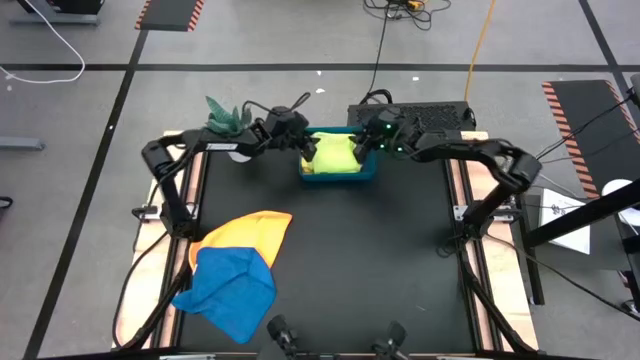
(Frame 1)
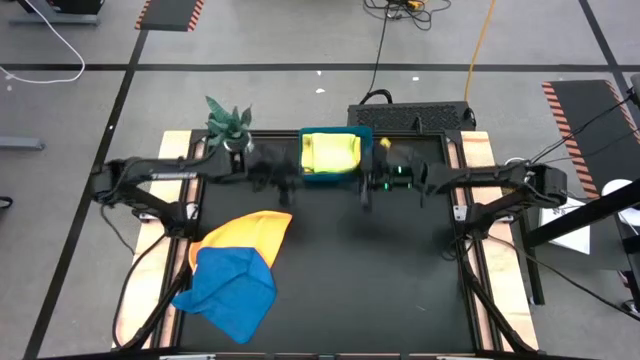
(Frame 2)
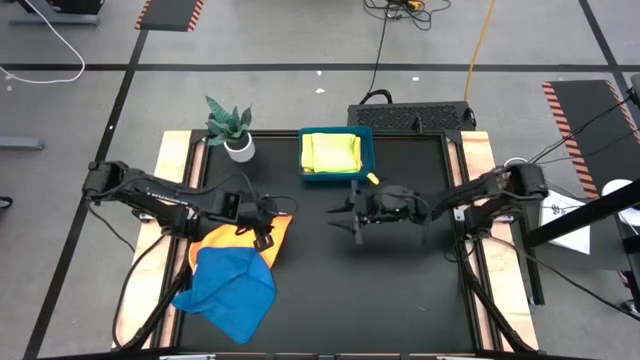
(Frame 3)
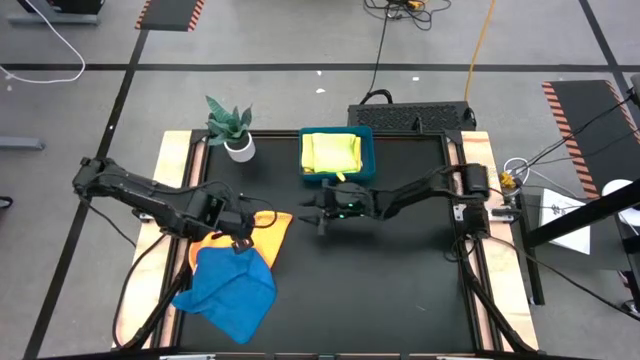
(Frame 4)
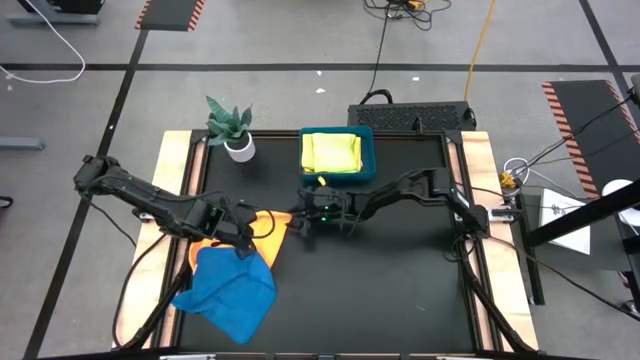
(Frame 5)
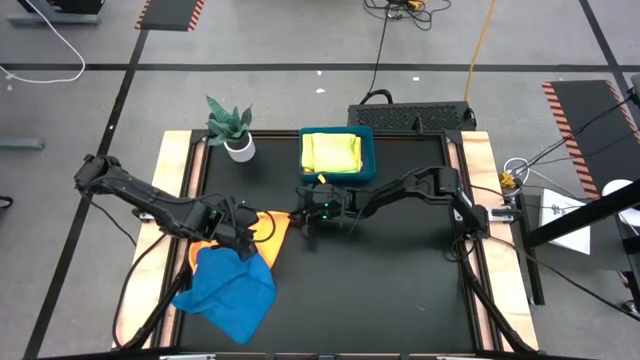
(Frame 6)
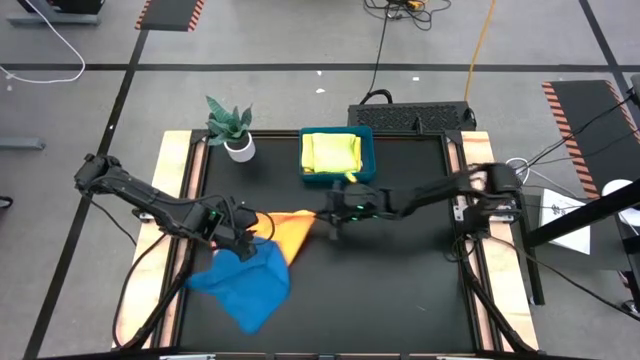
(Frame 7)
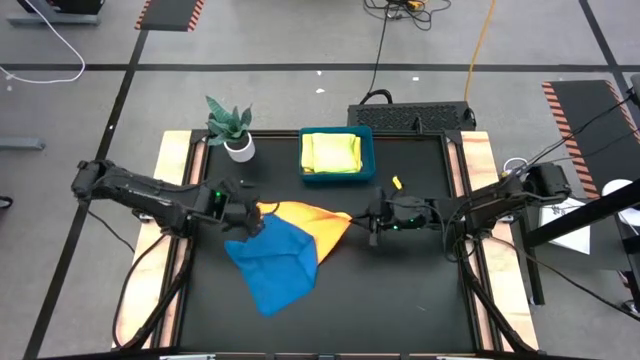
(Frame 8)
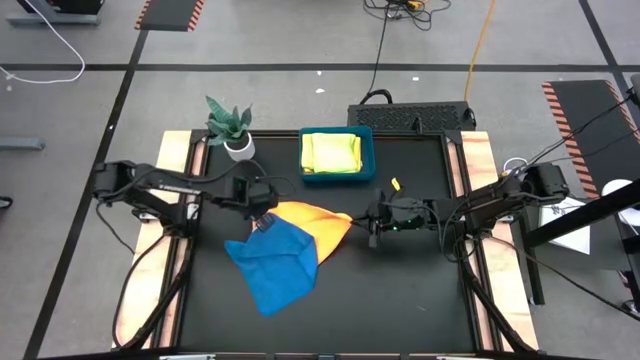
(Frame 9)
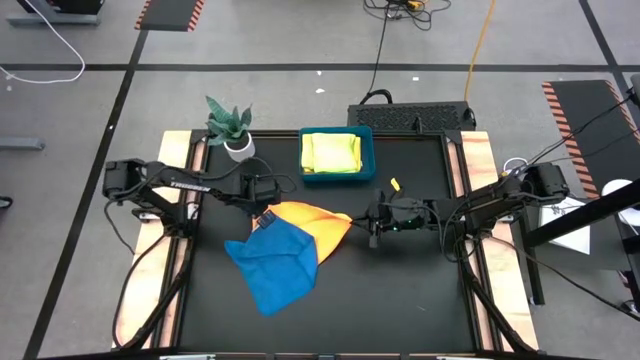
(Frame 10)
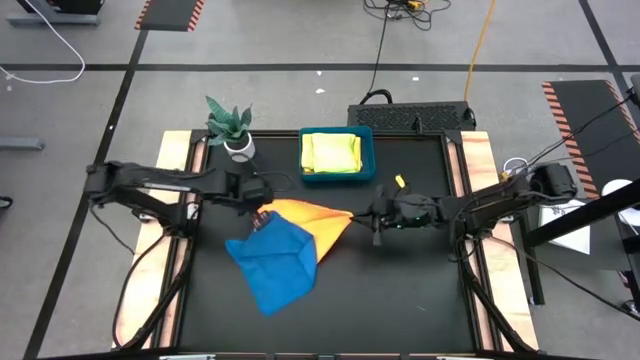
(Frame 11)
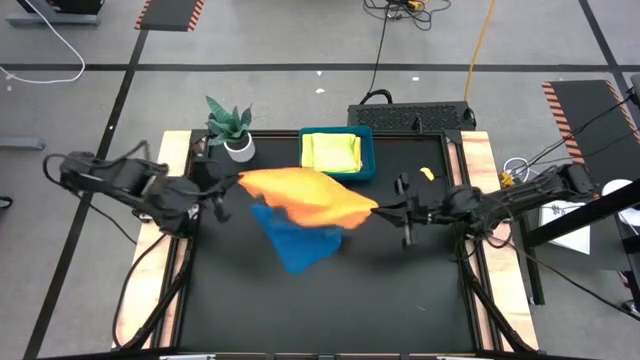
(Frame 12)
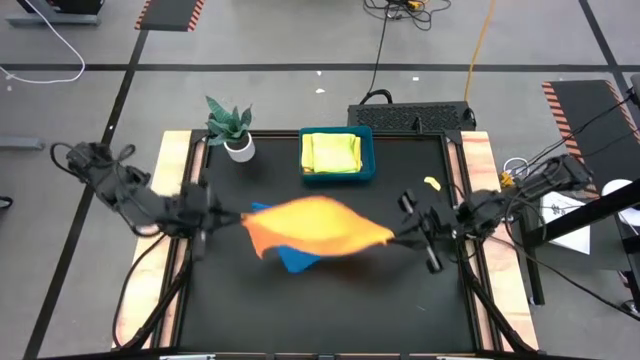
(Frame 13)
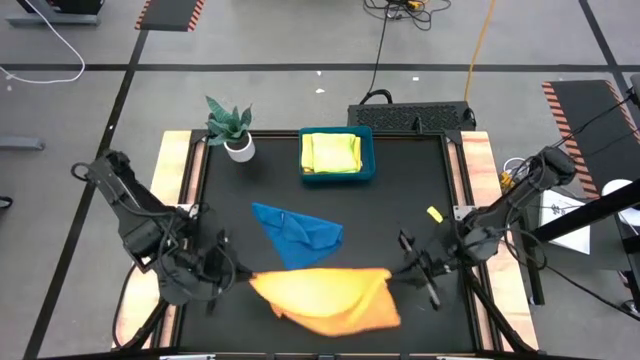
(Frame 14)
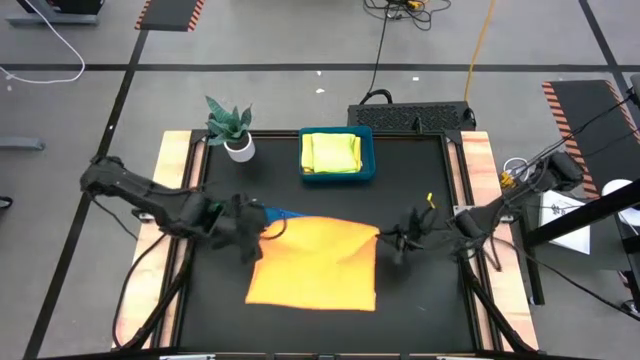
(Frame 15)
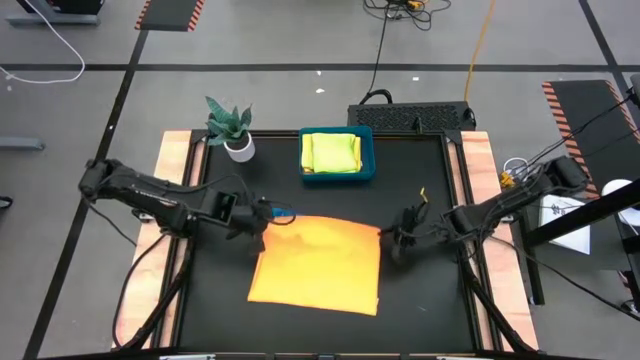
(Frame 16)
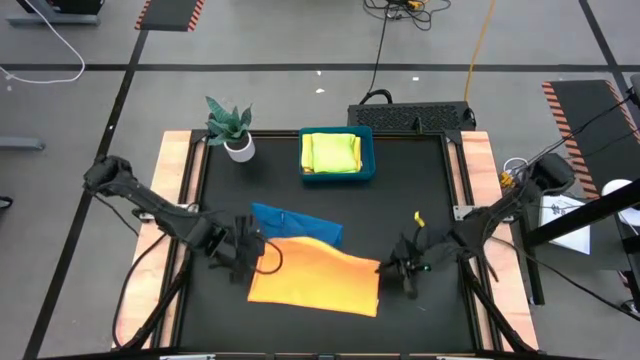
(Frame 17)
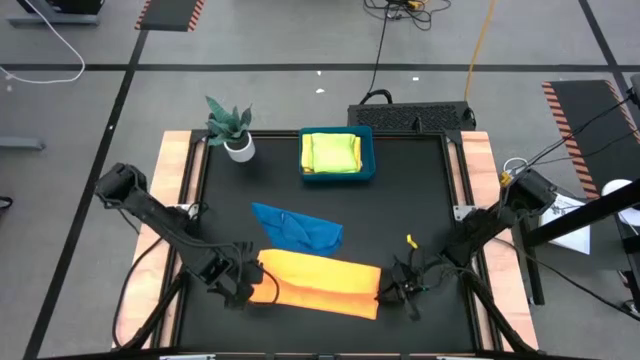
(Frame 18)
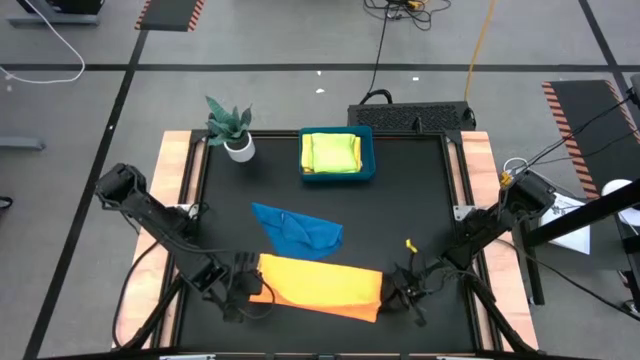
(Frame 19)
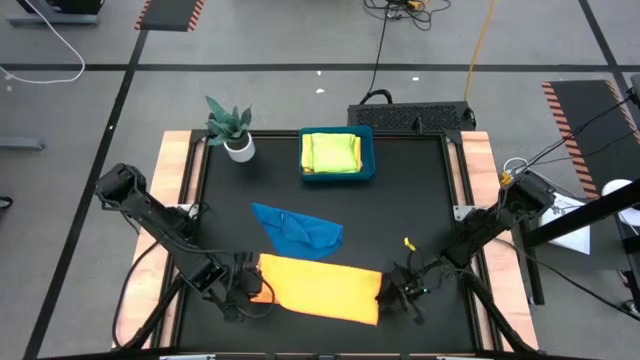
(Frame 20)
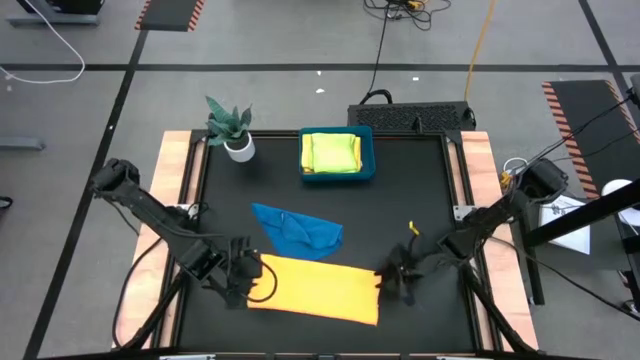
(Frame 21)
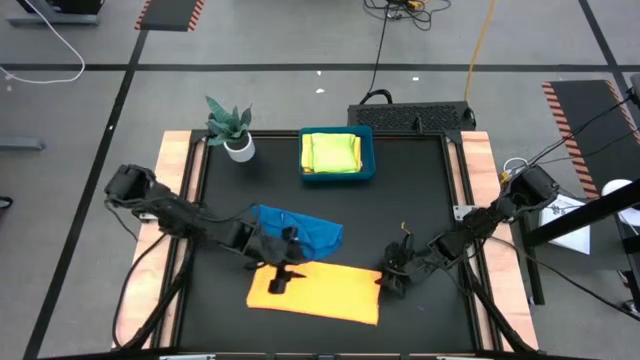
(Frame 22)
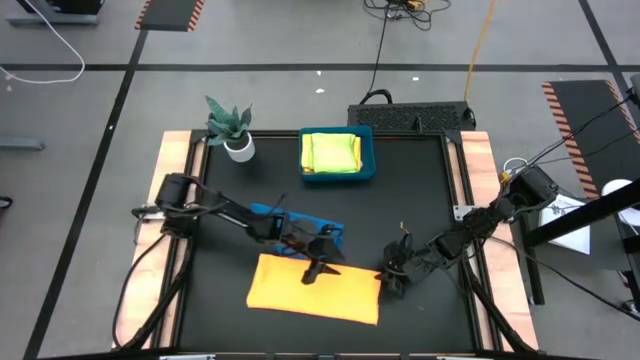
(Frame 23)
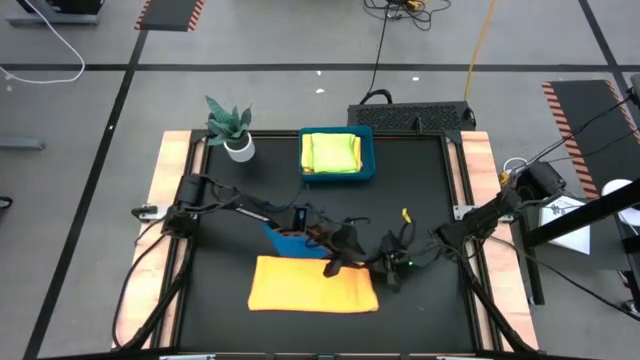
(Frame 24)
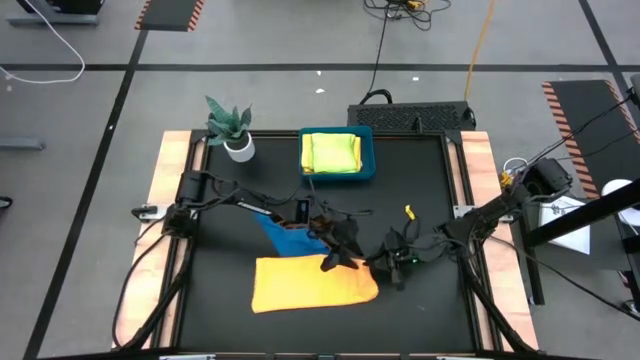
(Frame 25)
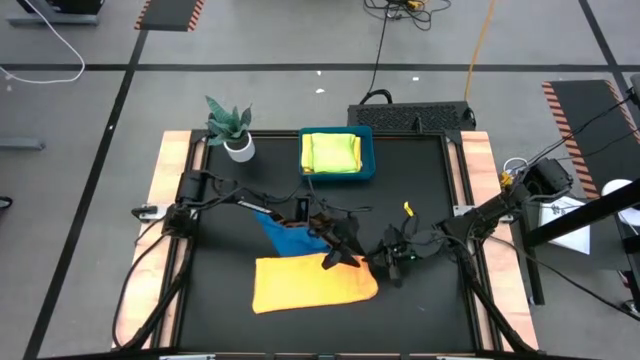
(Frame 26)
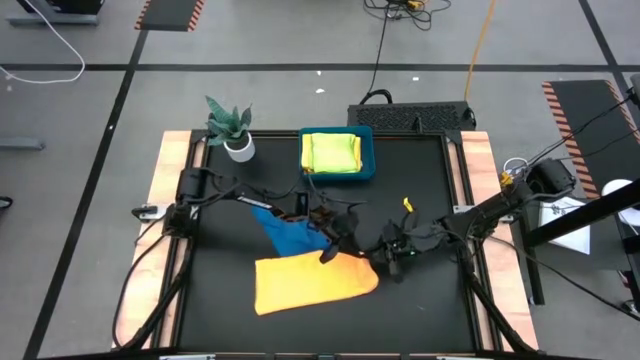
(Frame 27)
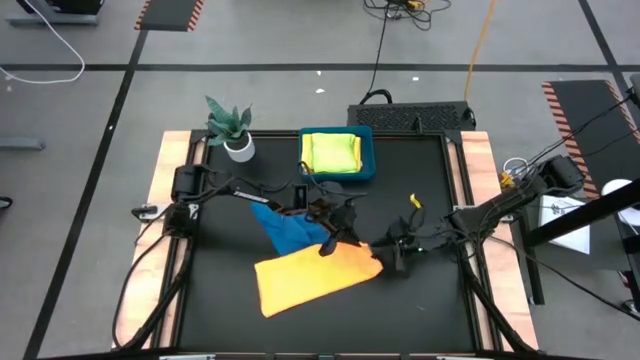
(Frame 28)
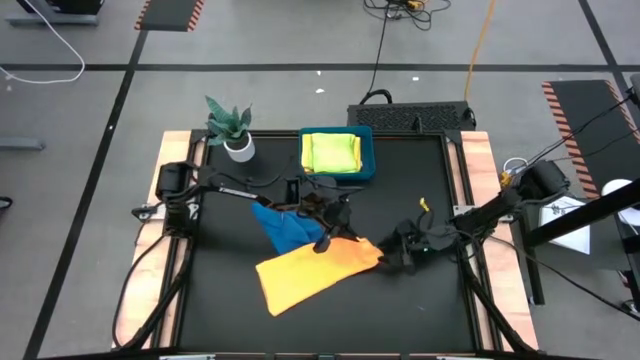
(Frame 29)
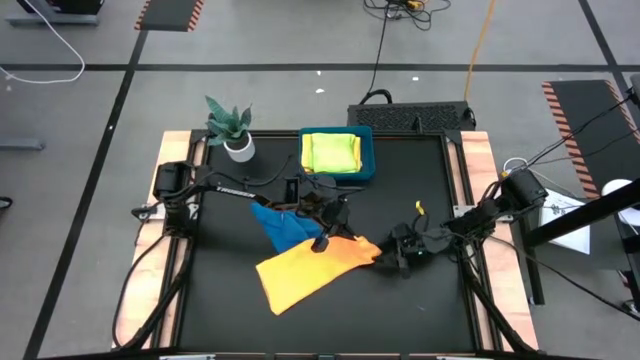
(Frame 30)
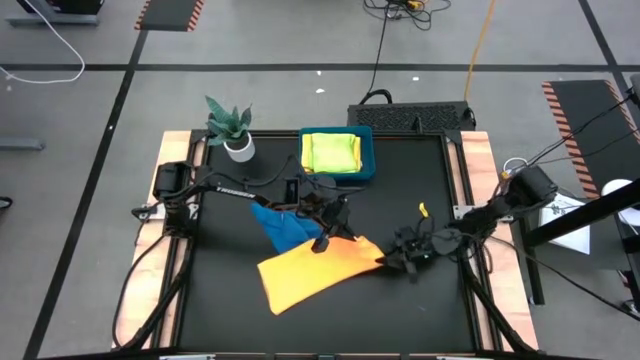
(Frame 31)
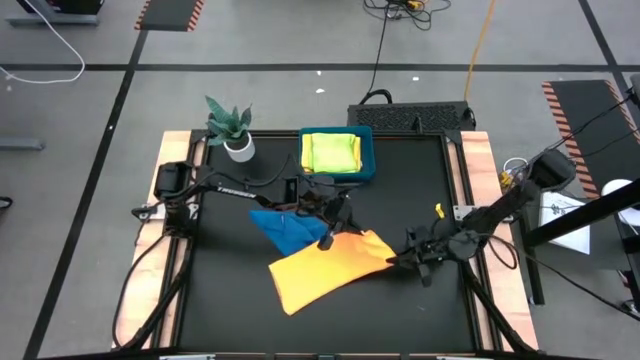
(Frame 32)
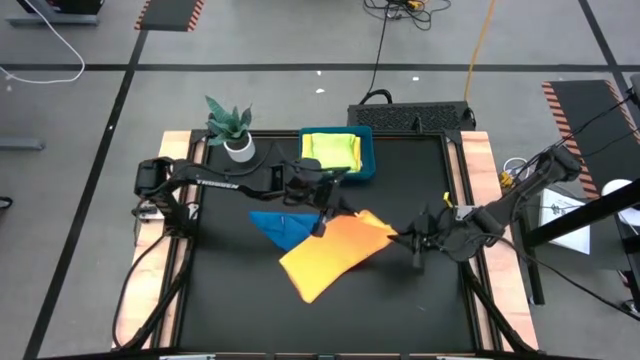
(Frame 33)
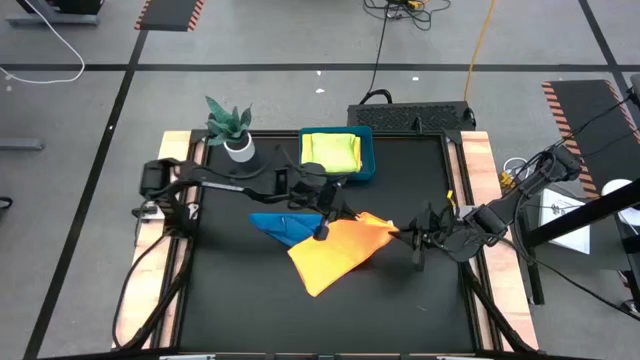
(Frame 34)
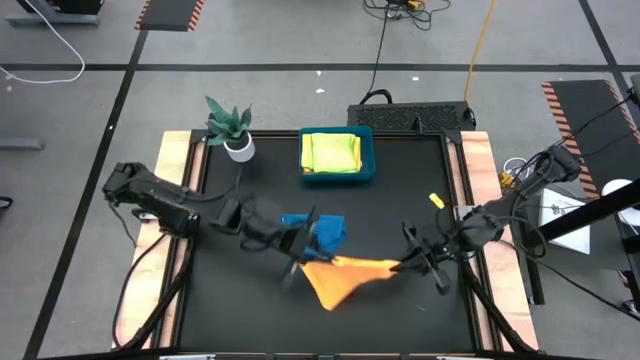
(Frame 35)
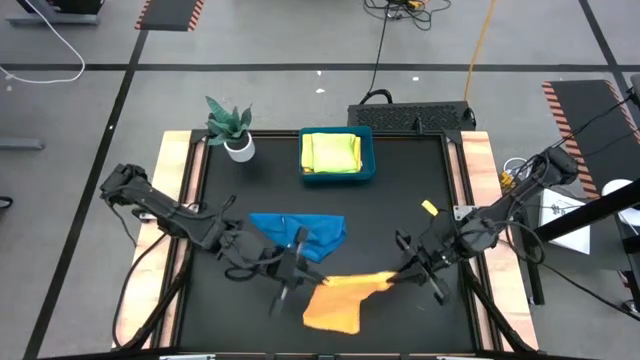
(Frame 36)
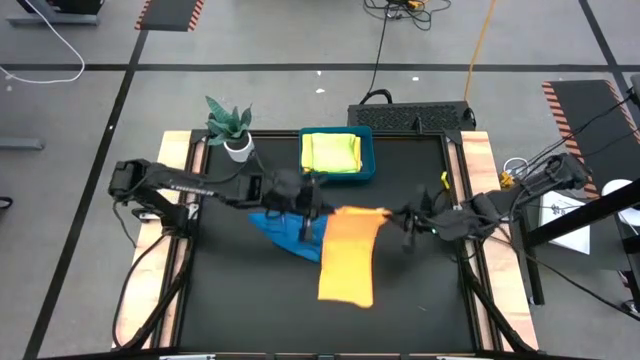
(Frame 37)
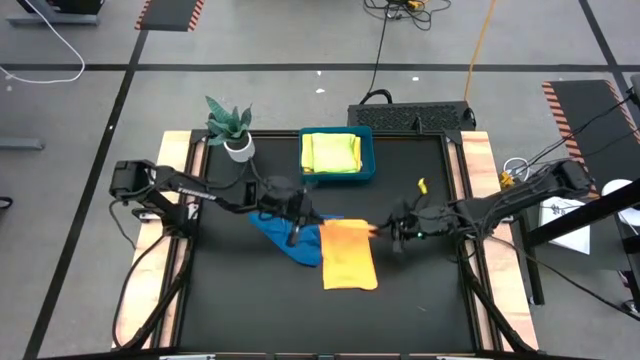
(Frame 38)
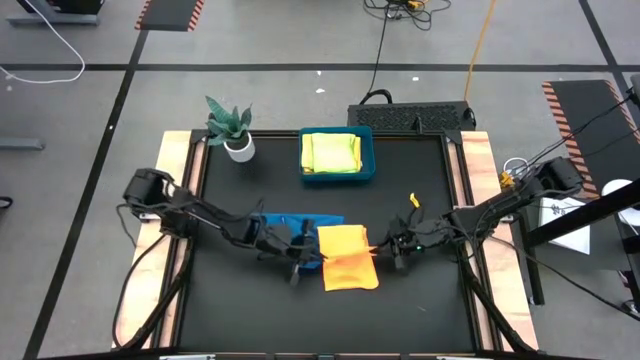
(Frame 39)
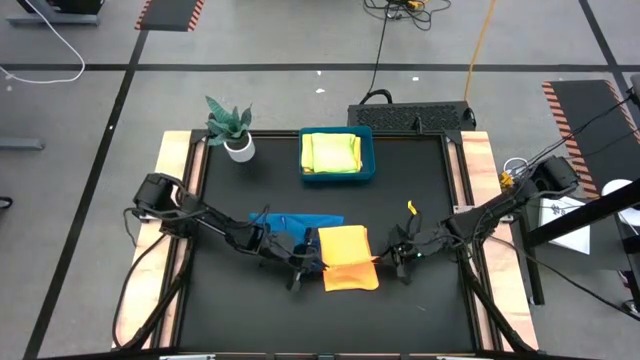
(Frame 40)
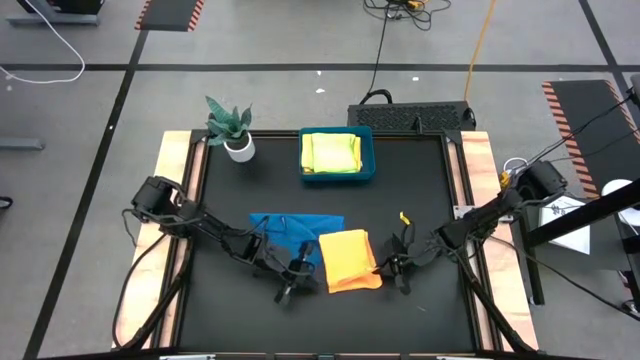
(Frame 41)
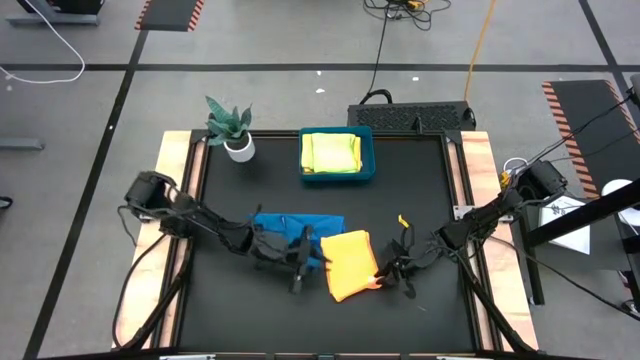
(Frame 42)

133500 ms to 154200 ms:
Task: Fold microfiber towels
Fold the orange microfiber cloth

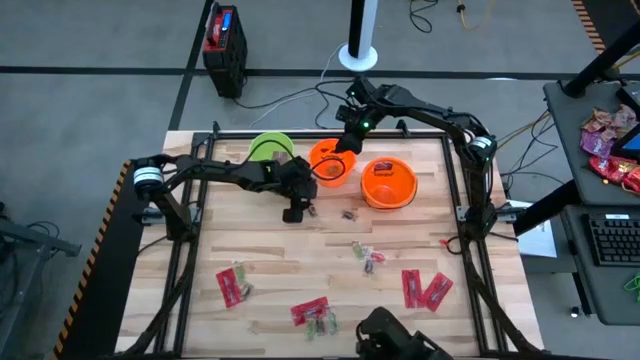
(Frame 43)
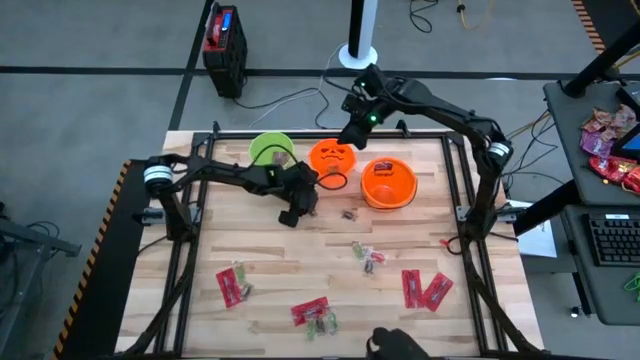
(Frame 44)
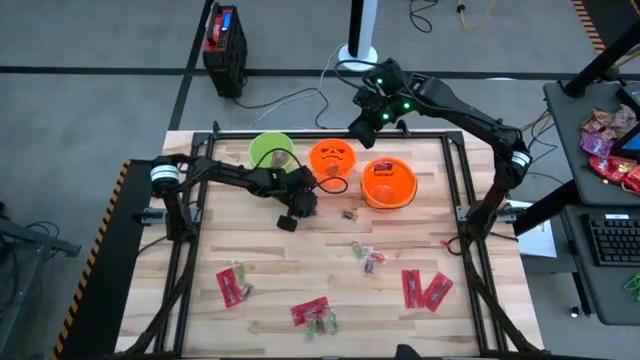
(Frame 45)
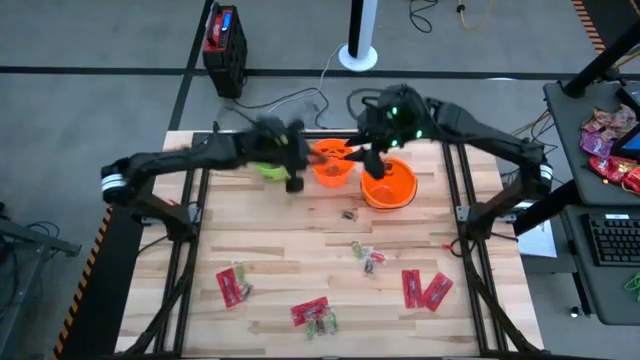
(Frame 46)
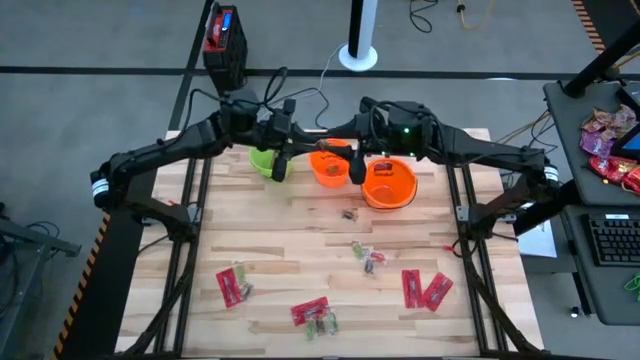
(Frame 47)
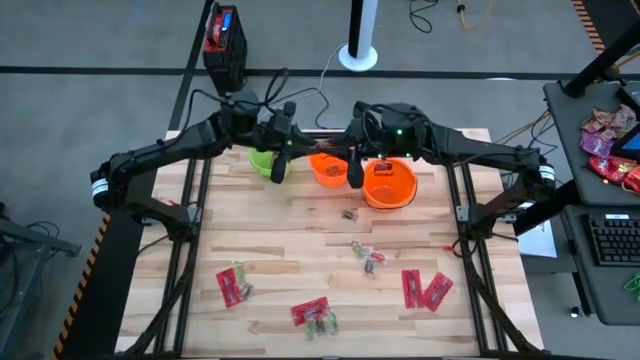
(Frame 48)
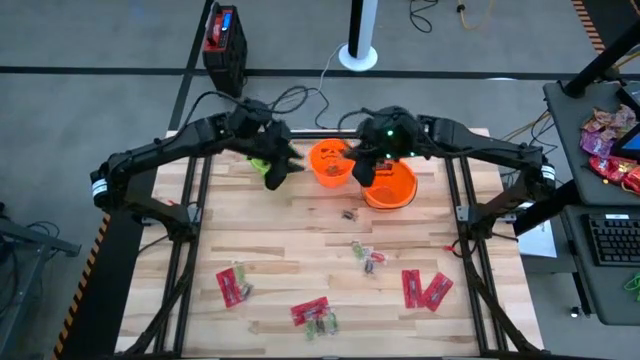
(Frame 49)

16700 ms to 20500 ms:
Task: Sort candy by brand, put in halloween buckets
Put the black candy into the right orange bucket
